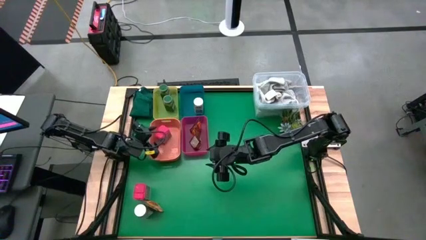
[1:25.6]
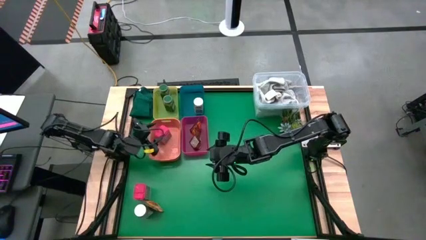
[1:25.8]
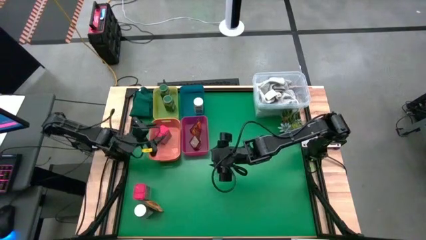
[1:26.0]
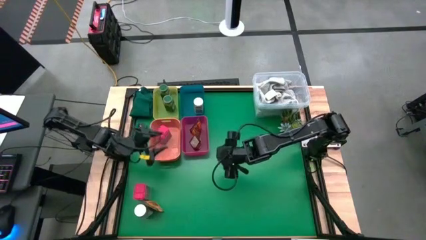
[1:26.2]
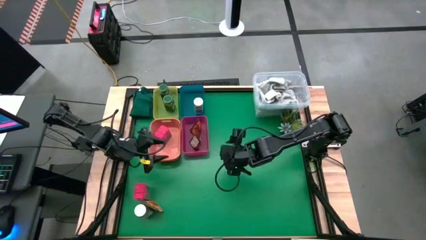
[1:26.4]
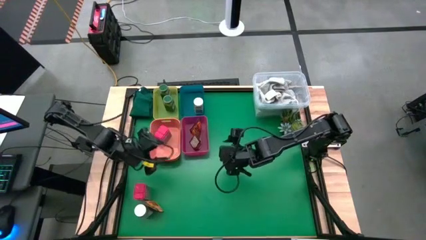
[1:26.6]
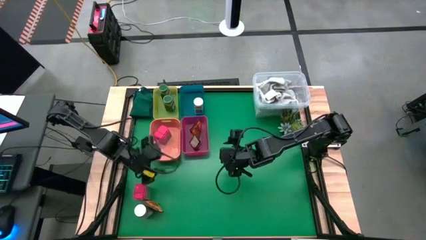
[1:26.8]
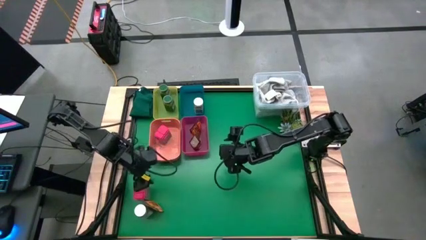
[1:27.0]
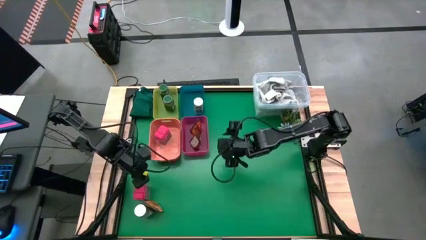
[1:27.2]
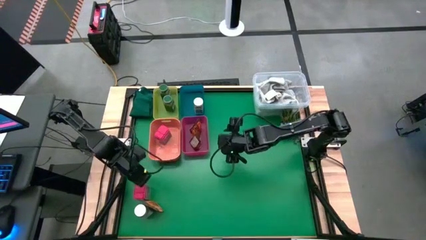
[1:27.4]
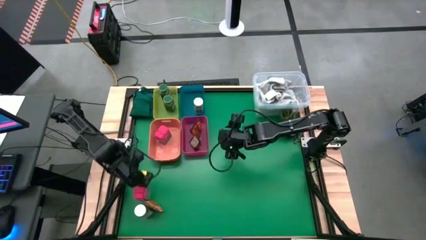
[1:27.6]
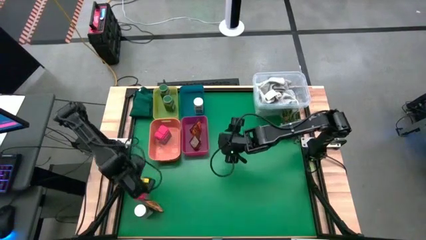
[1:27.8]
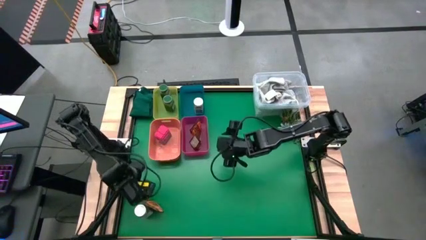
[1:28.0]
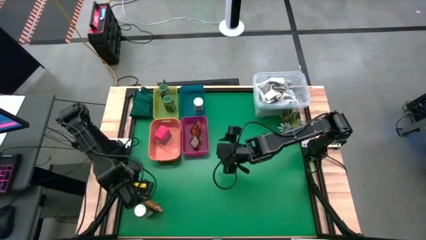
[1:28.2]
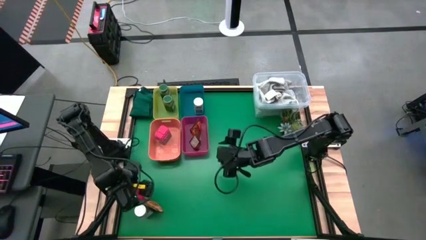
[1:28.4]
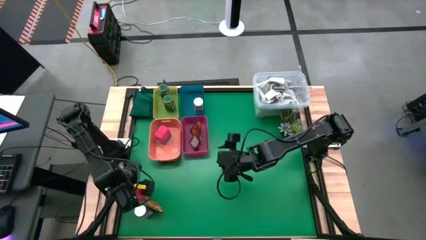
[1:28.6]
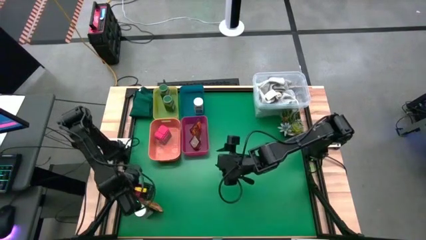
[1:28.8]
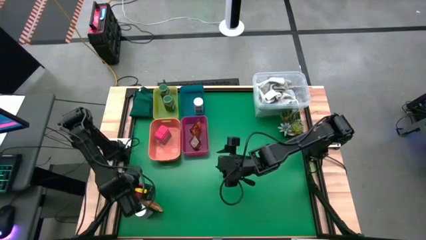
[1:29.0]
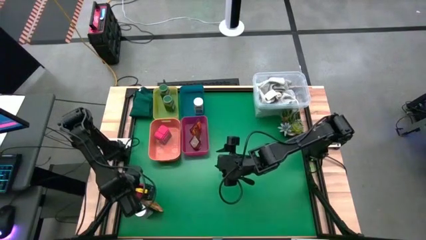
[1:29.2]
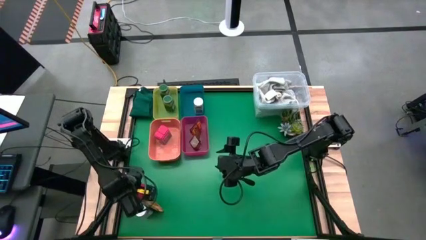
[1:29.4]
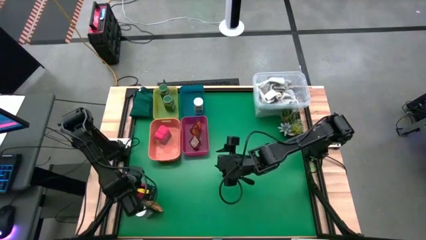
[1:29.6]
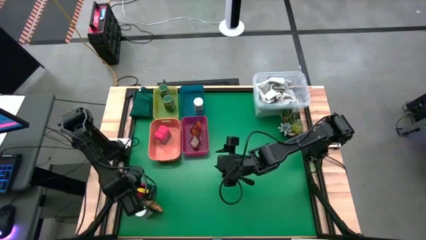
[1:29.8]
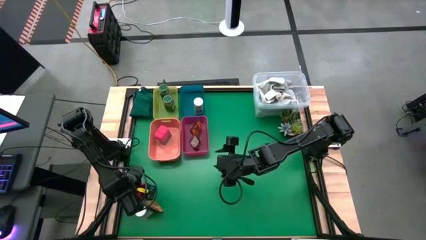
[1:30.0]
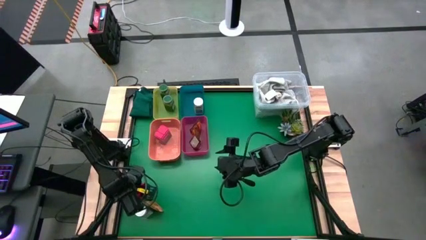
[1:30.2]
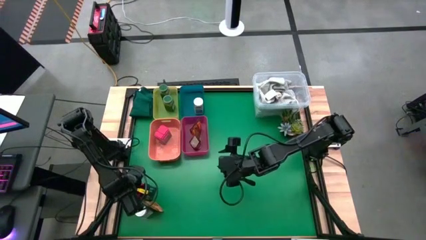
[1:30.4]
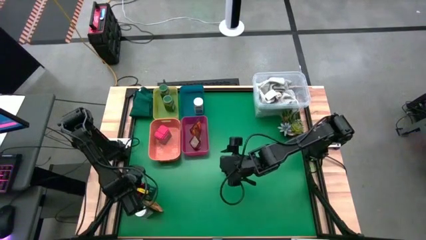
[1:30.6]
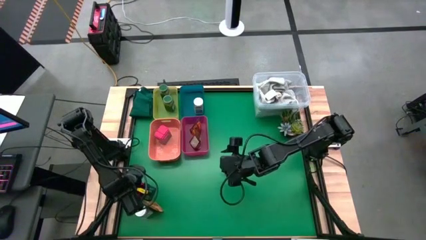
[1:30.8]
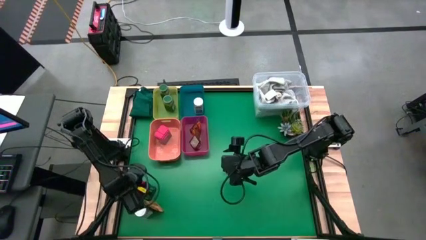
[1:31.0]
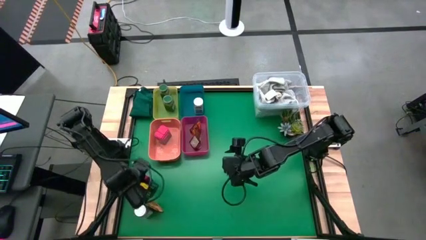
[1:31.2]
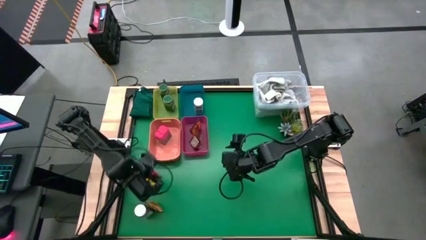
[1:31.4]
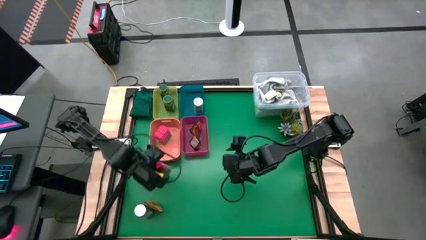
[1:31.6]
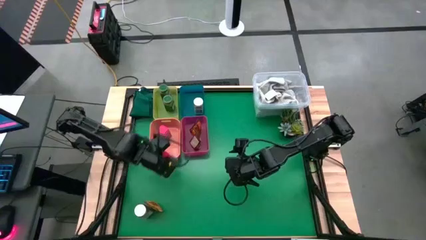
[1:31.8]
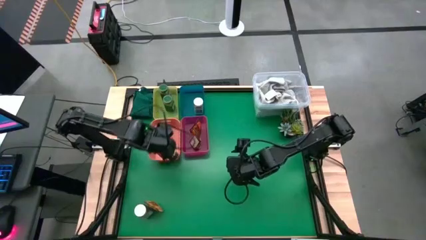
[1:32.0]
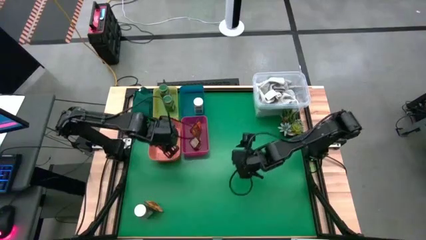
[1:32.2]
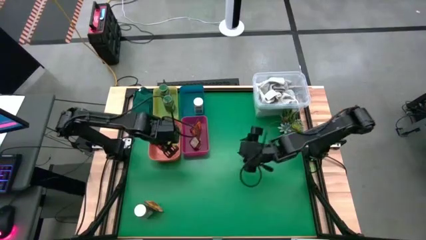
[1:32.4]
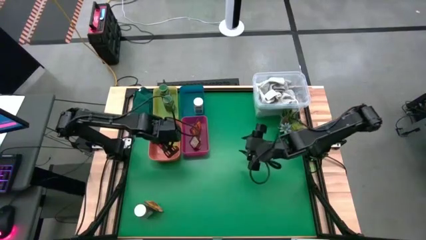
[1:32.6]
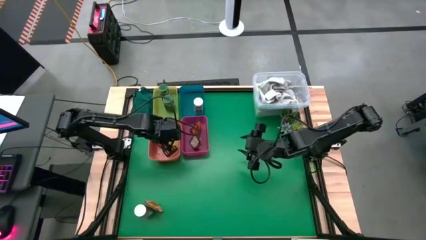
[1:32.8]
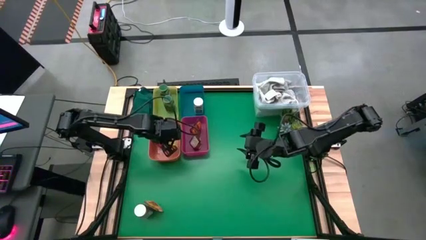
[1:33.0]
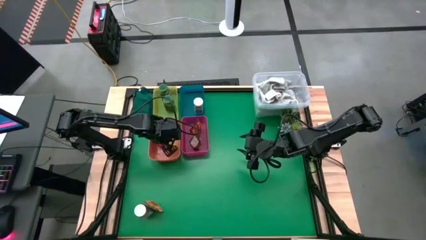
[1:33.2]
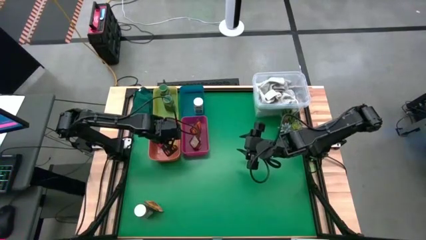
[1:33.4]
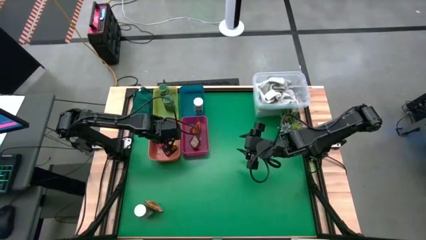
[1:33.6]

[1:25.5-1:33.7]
Task: Sort spices by type
Put the red seasoning can into the orange bin

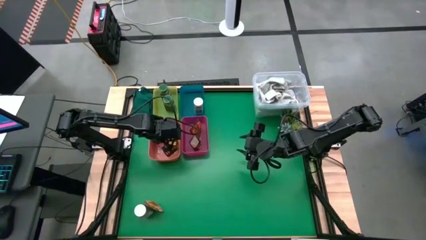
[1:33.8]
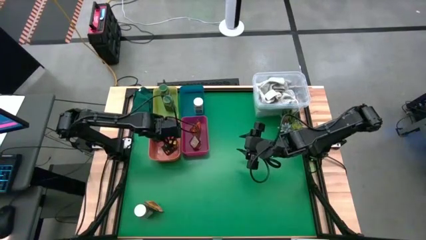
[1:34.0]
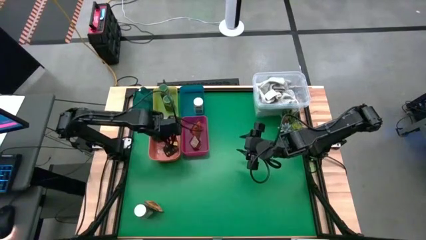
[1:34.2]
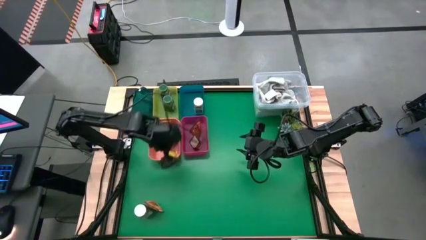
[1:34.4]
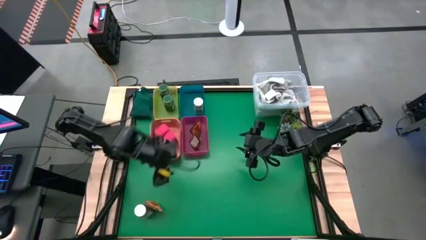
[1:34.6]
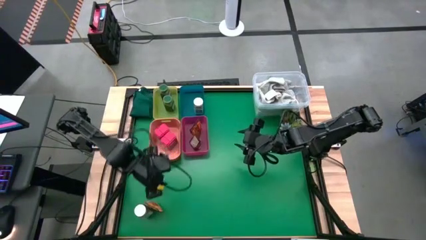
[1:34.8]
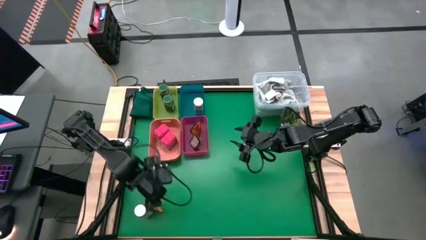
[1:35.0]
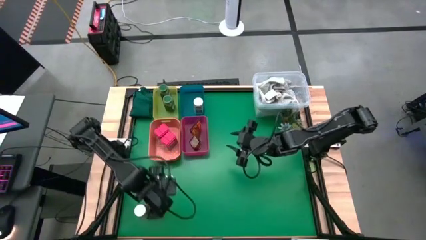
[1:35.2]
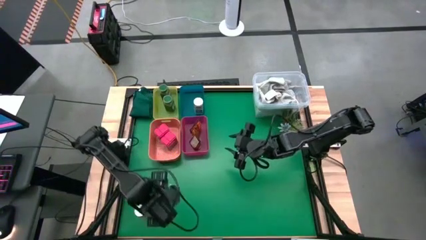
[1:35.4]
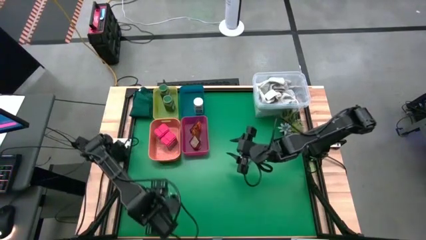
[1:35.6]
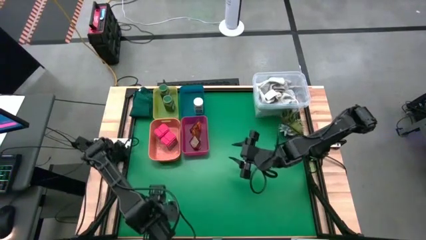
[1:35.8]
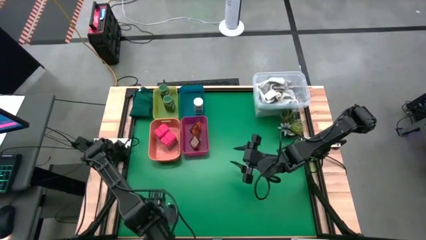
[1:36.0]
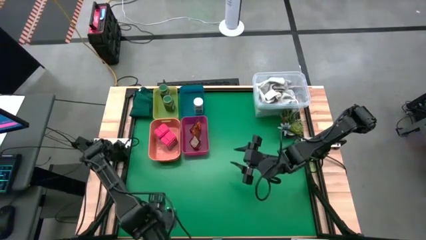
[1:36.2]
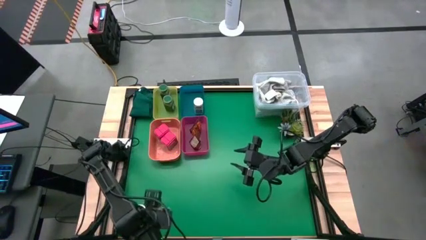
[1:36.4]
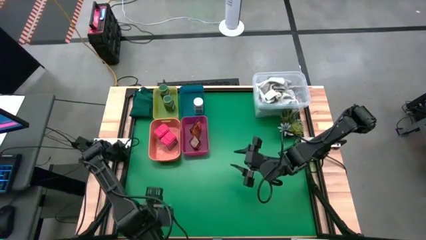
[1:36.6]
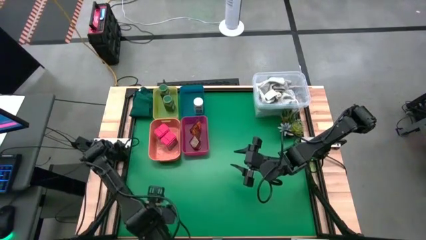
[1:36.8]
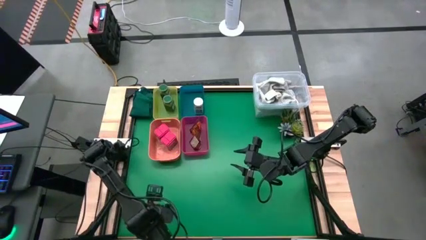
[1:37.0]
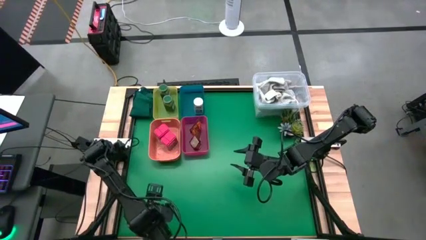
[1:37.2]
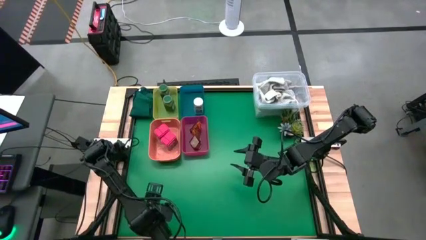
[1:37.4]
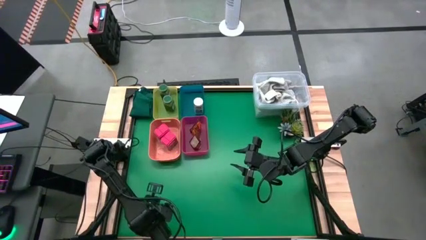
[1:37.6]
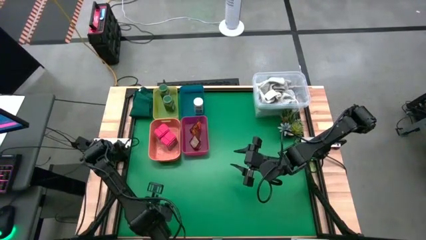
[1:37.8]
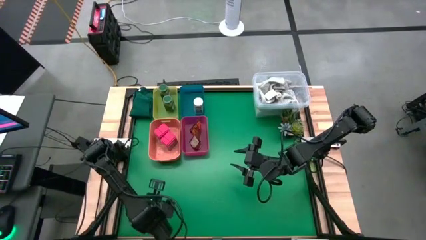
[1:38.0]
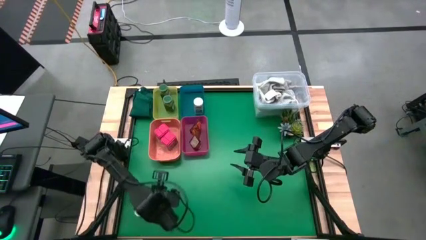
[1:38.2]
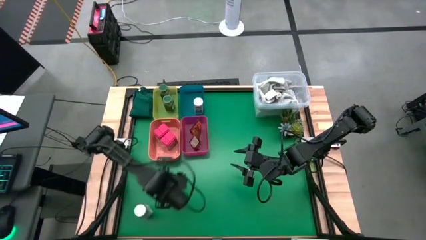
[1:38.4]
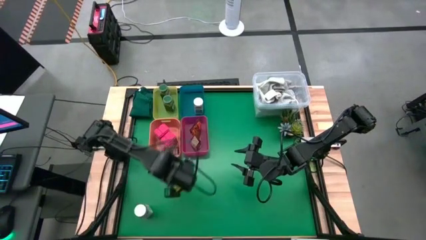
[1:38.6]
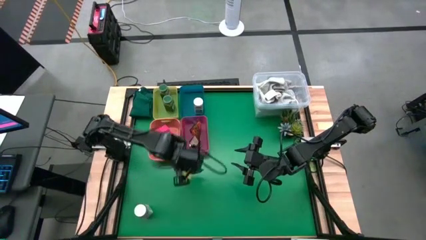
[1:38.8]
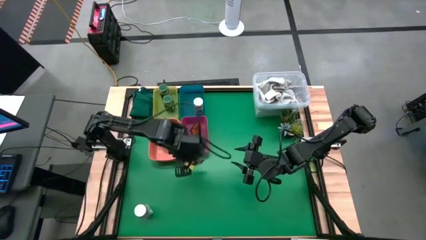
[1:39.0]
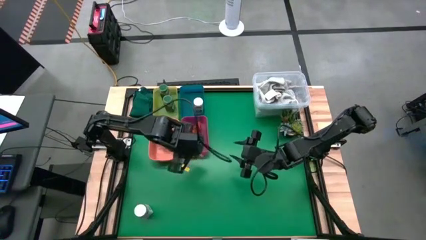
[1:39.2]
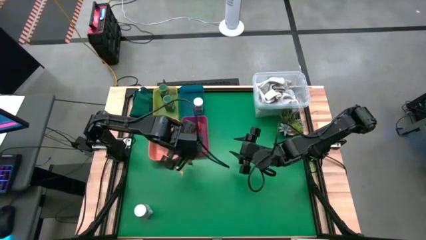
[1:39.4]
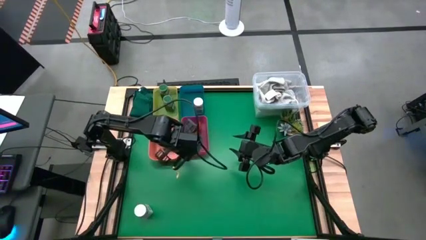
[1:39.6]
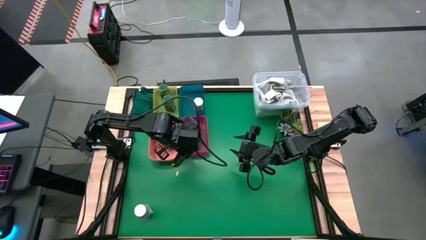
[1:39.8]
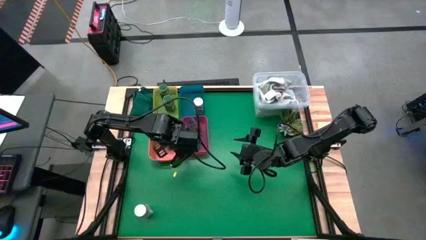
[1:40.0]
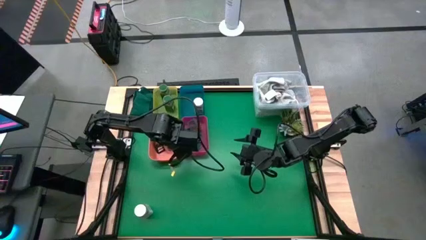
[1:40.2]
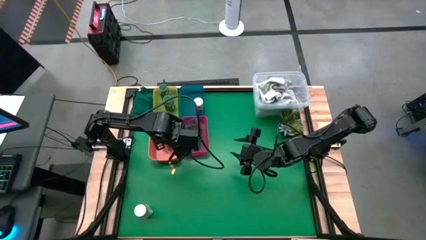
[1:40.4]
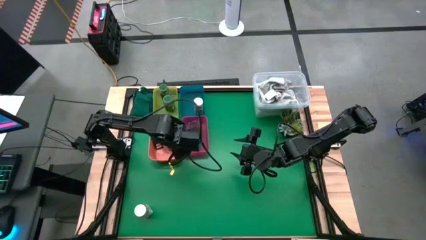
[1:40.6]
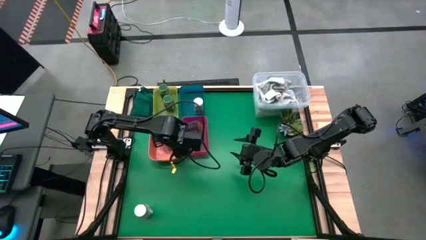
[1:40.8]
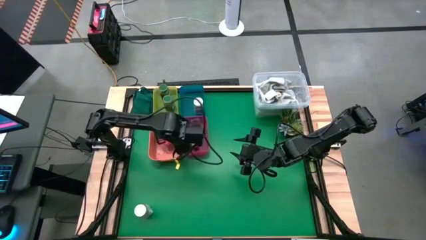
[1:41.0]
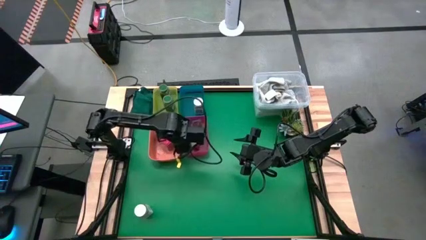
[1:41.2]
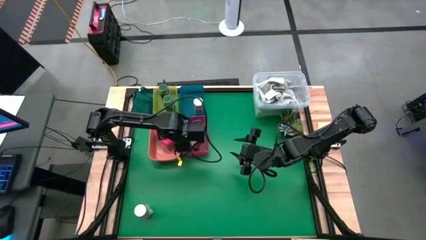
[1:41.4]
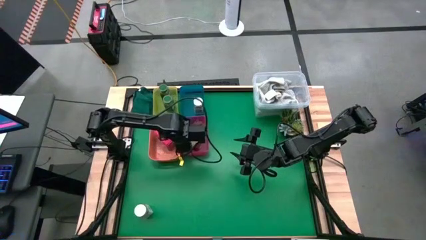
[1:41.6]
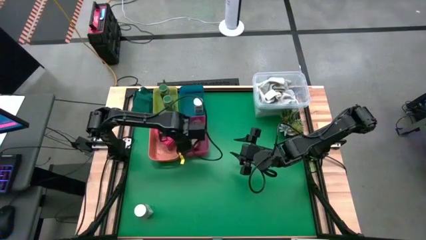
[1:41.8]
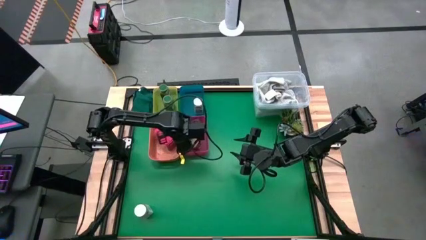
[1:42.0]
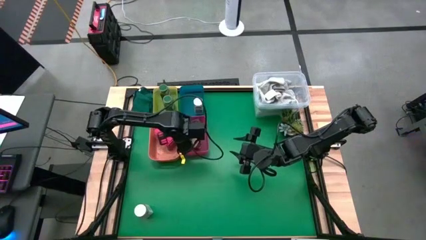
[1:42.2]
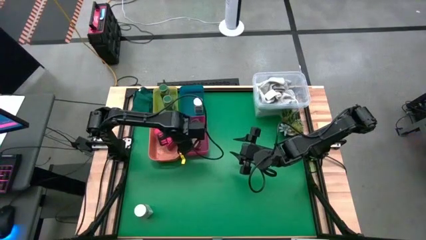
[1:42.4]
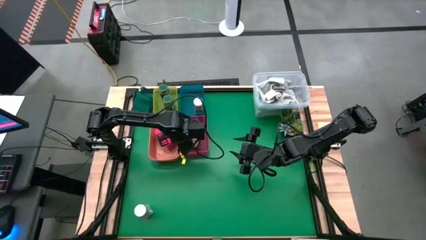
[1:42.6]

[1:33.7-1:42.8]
Put the orange seasoning pack into the light red bin
